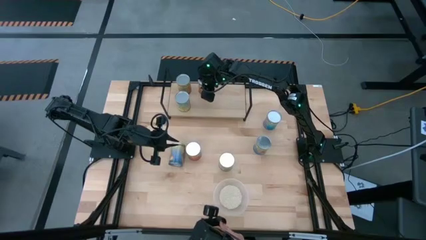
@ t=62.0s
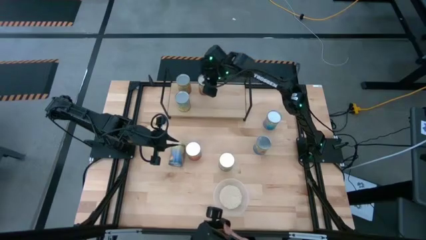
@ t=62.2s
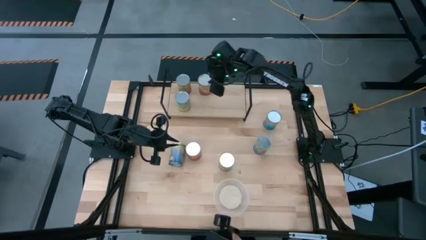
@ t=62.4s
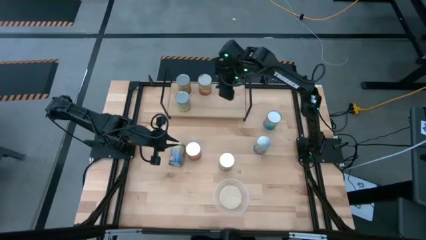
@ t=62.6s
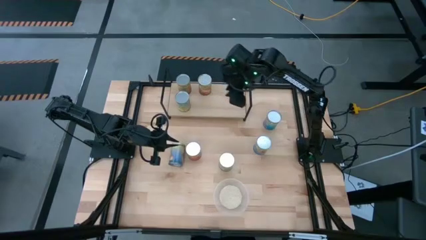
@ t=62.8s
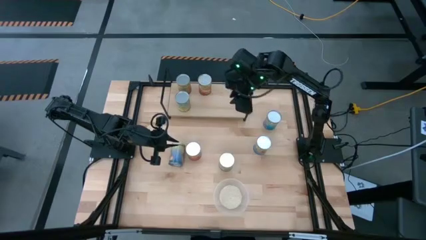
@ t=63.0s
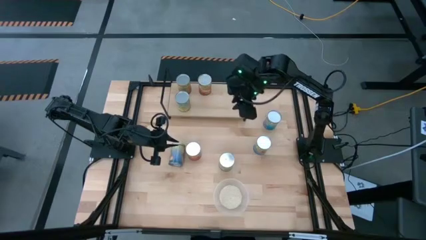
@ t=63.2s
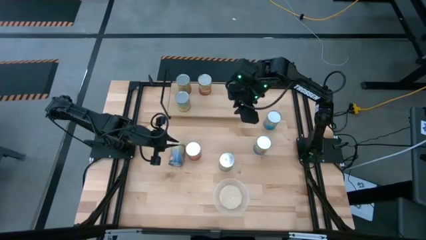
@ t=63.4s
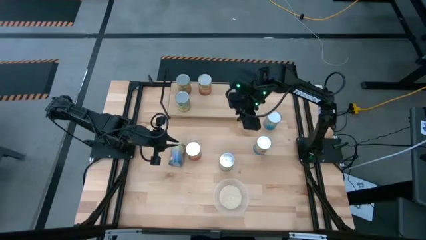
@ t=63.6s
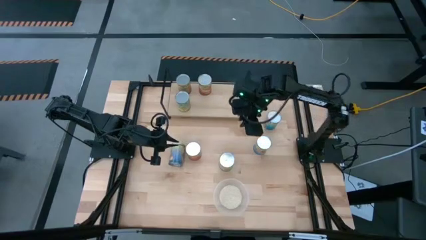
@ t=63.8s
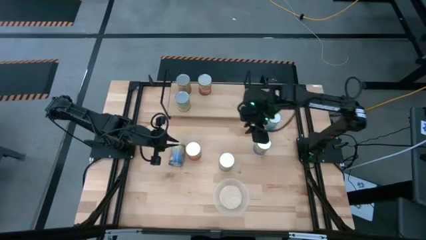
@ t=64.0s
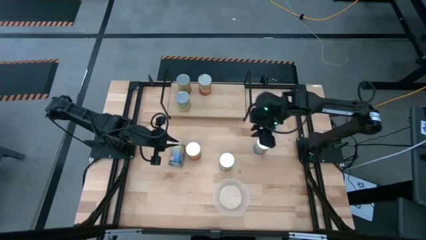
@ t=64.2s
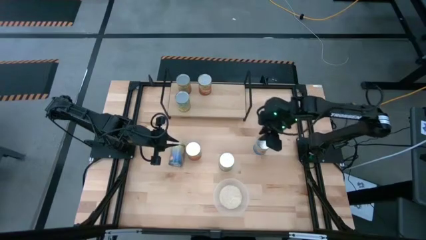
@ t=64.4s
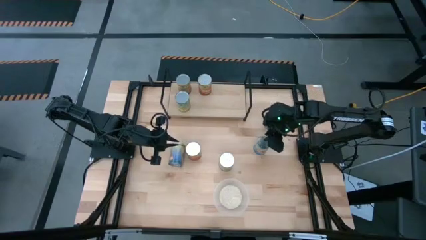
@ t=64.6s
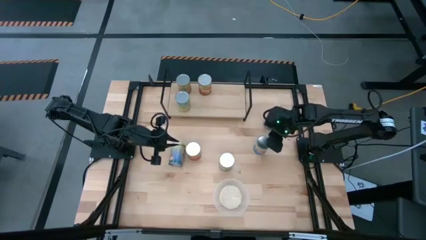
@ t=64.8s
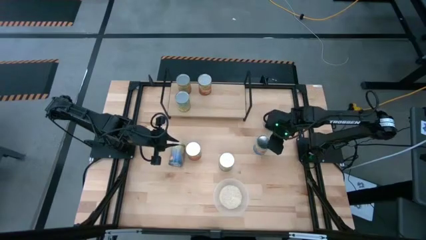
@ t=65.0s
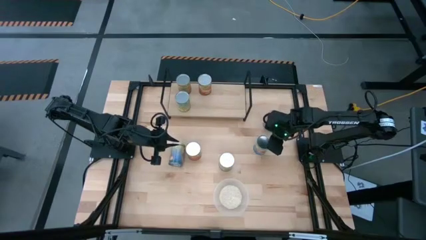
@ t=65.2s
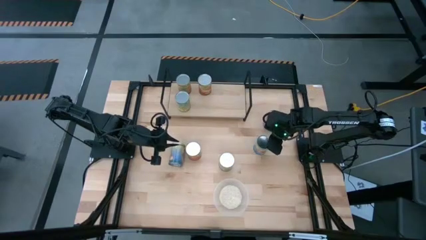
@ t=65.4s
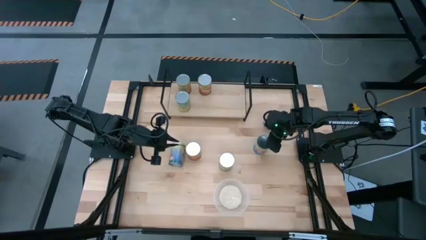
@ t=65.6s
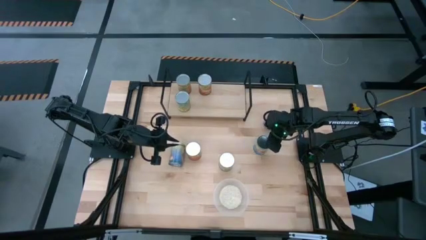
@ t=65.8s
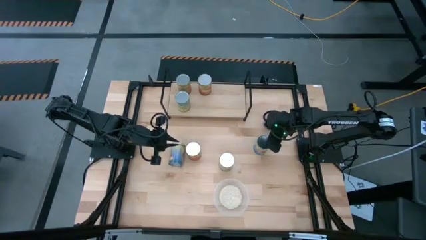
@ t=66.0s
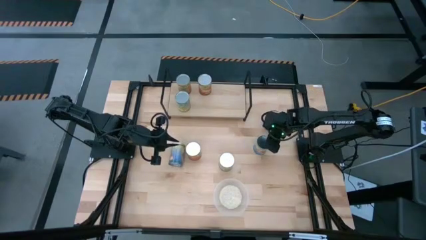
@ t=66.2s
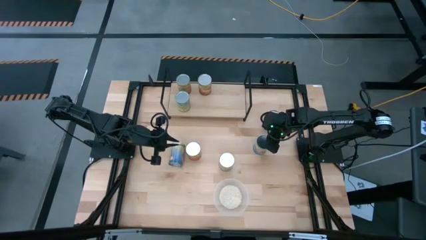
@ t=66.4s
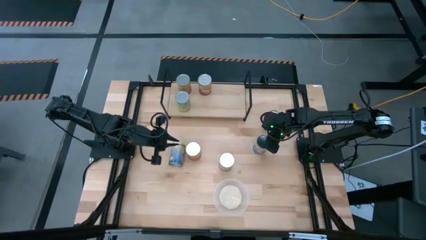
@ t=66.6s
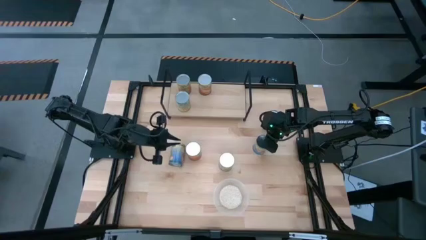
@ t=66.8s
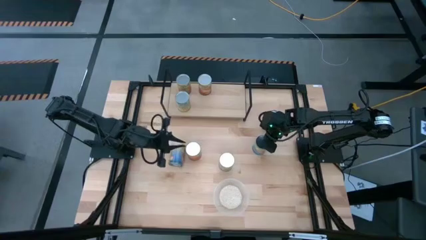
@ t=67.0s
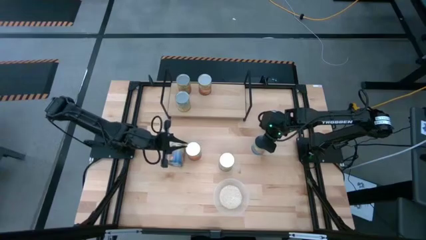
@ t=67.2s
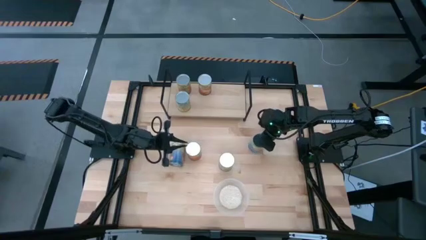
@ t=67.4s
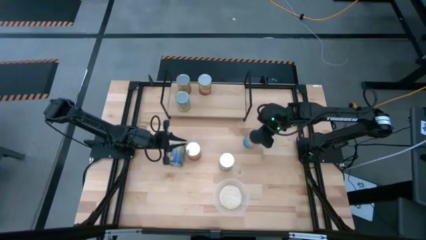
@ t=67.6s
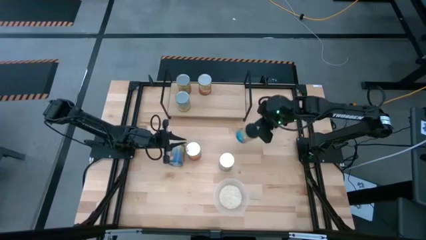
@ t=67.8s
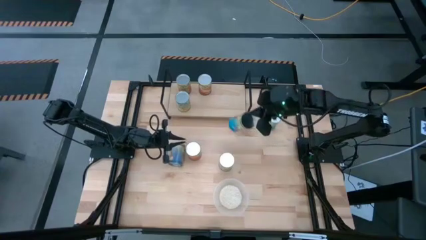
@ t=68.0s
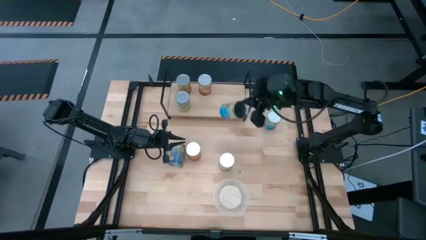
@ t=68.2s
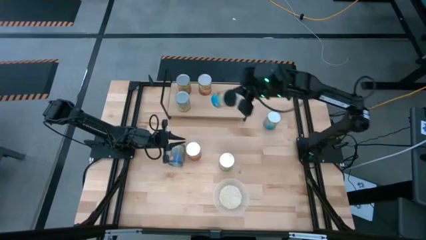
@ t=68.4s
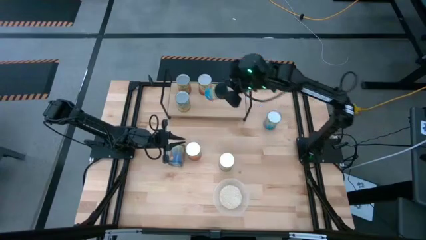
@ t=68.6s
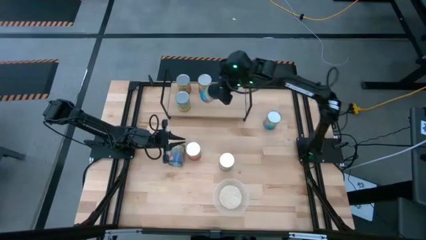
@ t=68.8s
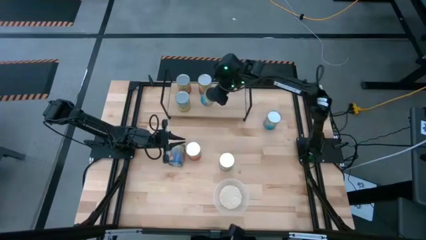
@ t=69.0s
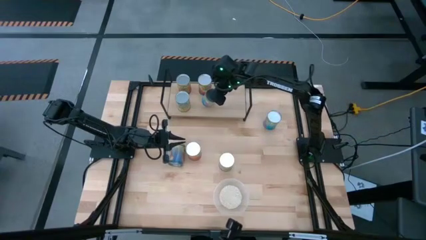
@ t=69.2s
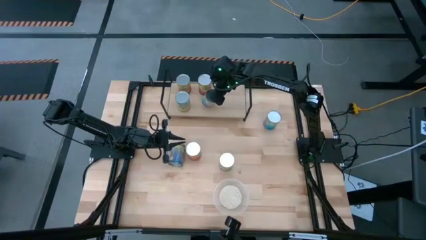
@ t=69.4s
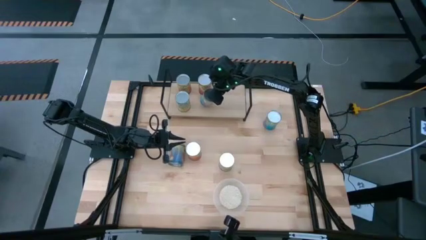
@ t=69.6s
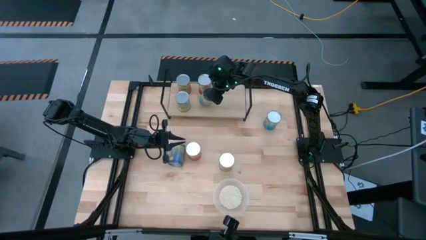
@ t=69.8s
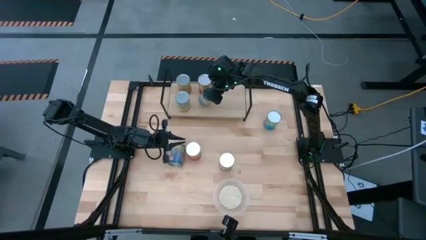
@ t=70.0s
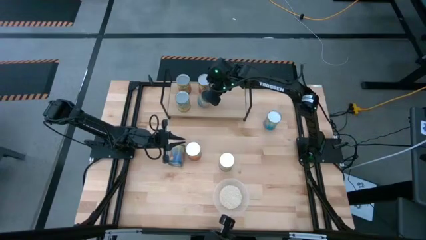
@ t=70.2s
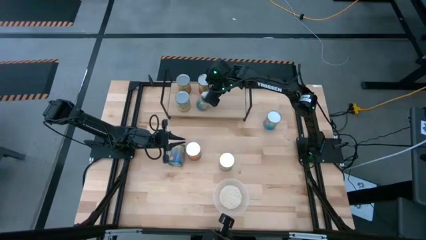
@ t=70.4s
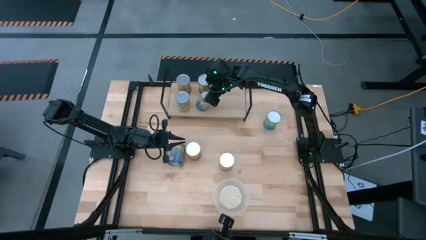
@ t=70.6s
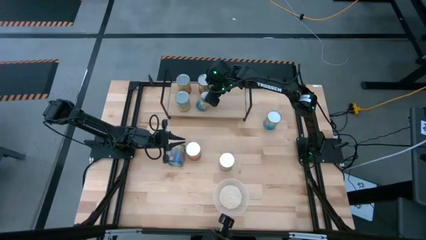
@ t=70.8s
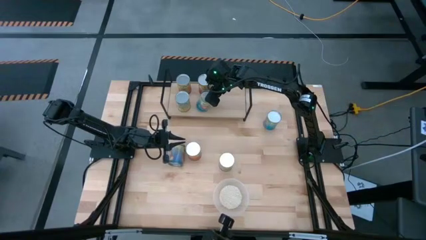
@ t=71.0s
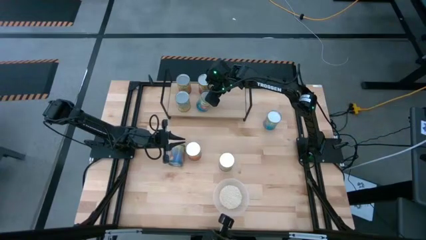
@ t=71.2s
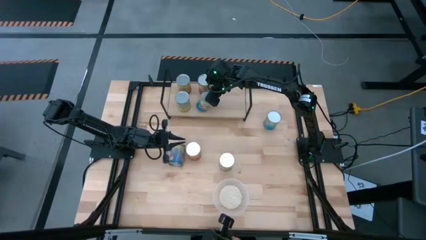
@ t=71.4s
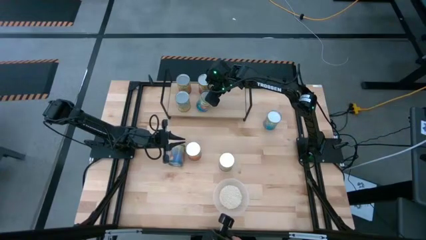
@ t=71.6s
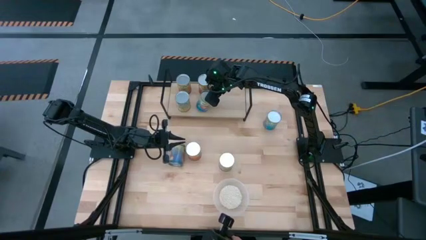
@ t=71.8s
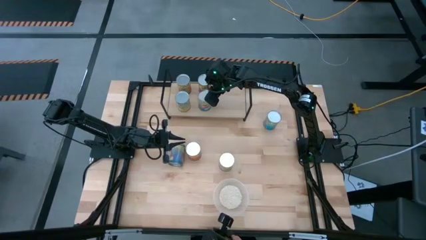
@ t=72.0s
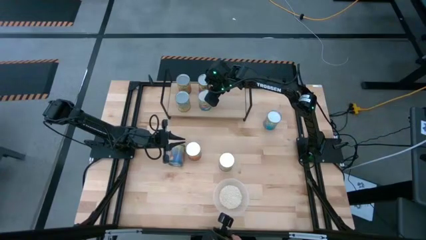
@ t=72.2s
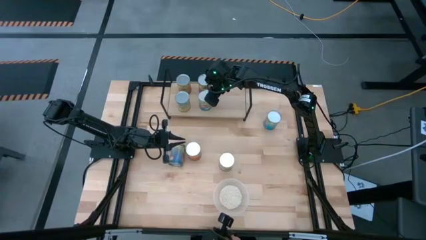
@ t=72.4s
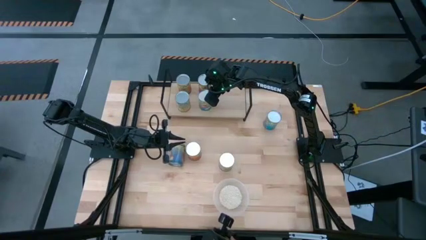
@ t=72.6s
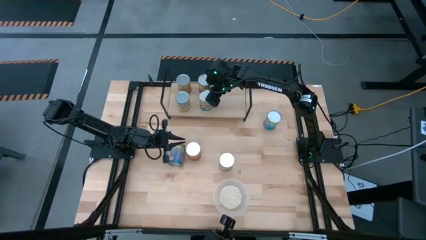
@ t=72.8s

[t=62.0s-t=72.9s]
Task: Pick and place cans onto a shelf
Put the canned tomatoes on the shelf

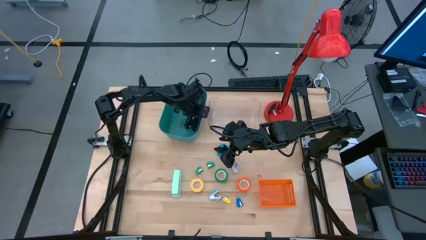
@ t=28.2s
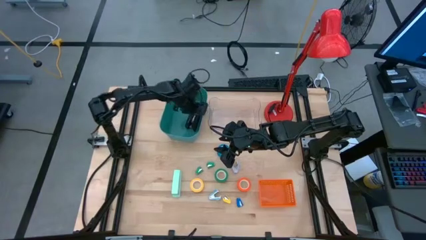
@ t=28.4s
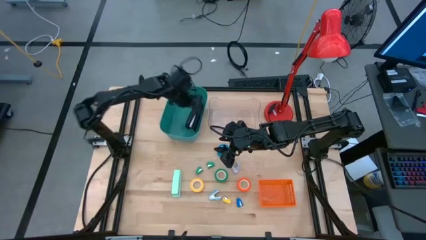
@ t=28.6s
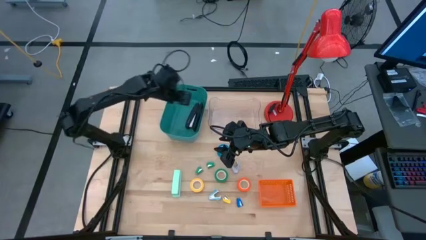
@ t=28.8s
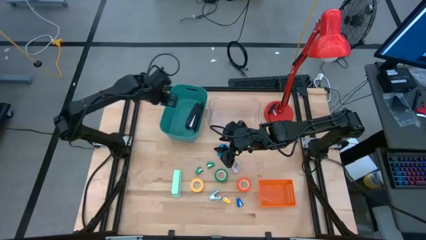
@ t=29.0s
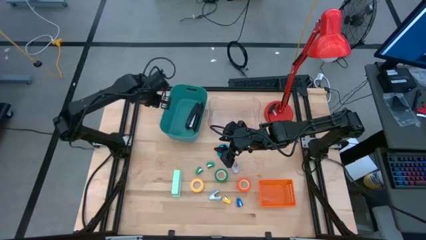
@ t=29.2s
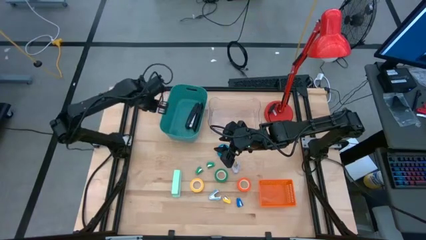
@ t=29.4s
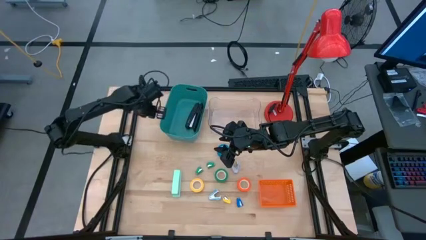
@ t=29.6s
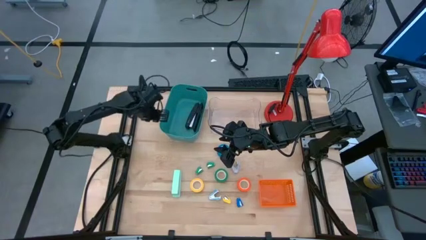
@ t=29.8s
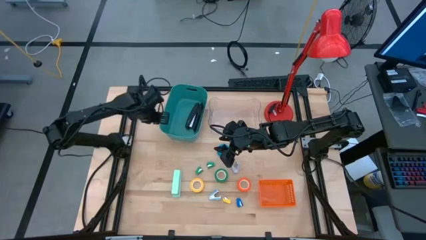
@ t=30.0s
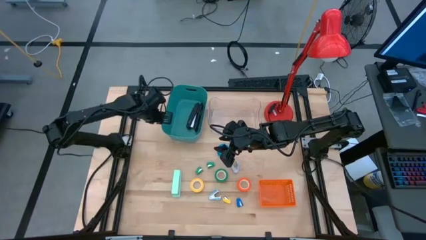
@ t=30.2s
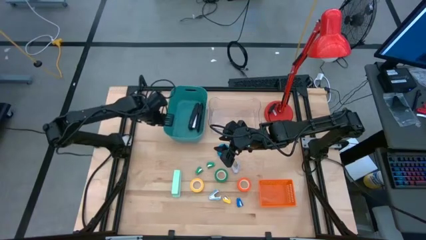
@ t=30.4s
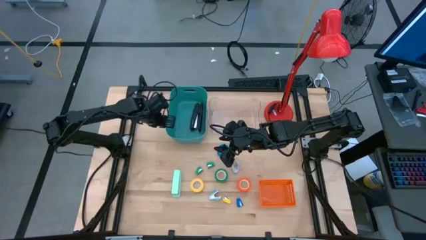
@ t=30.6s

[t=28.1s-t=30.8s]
Task: Pick and place Stapler, Stapler remover, tape
Adjust the blue bin
